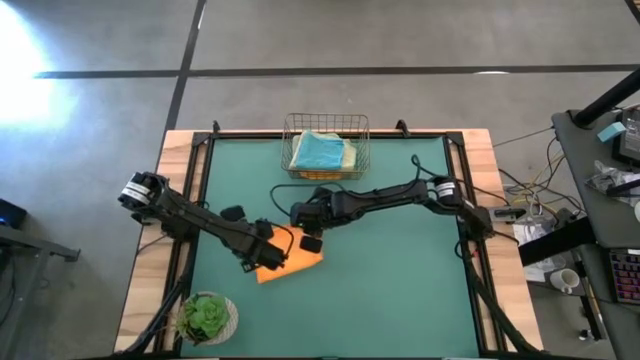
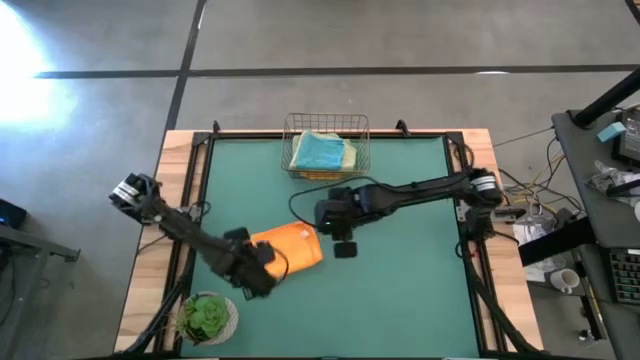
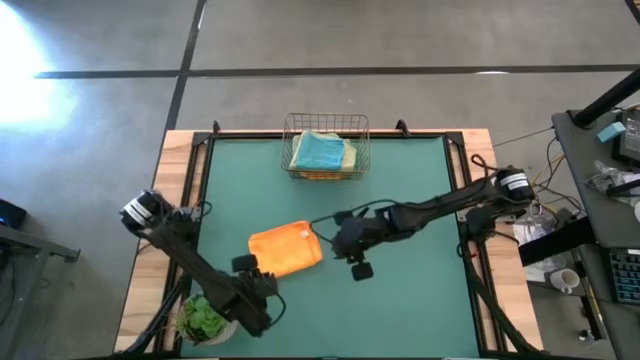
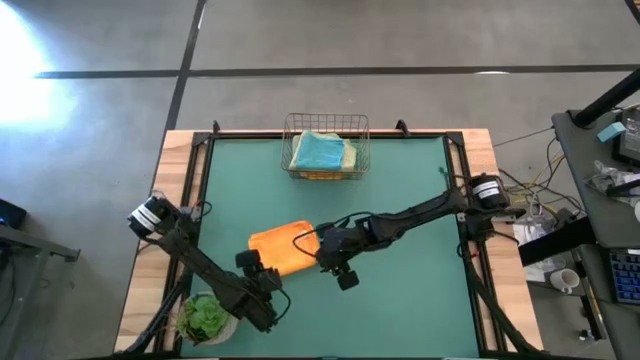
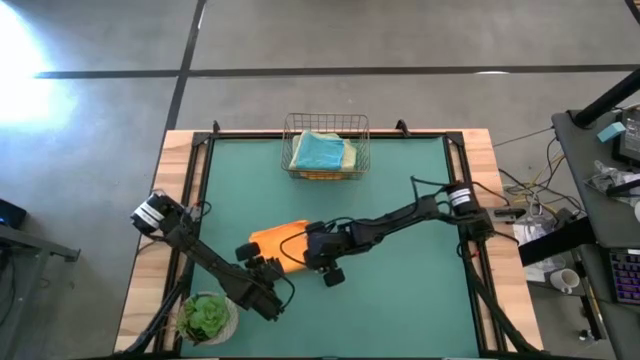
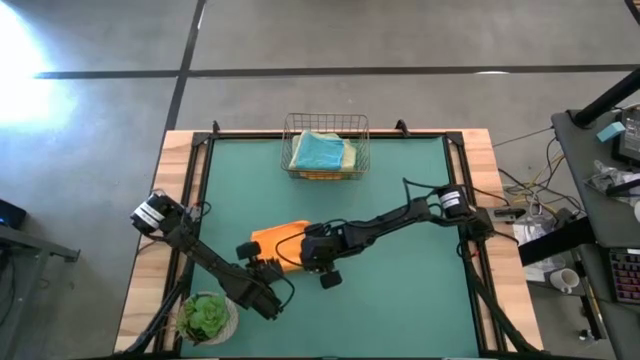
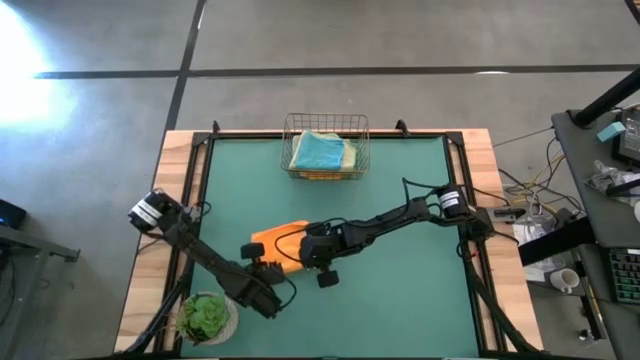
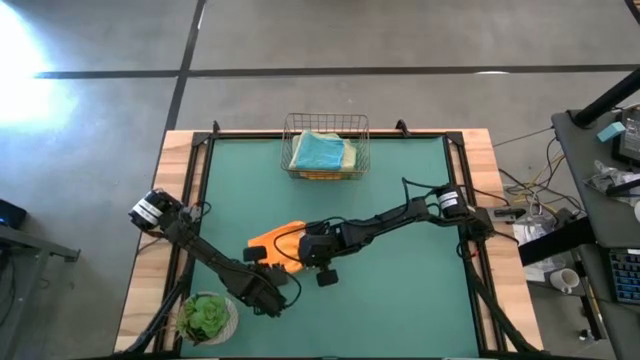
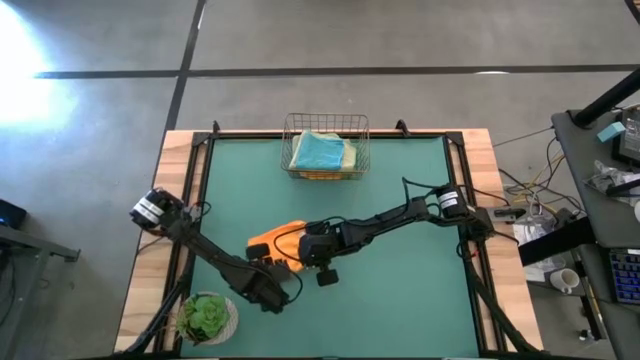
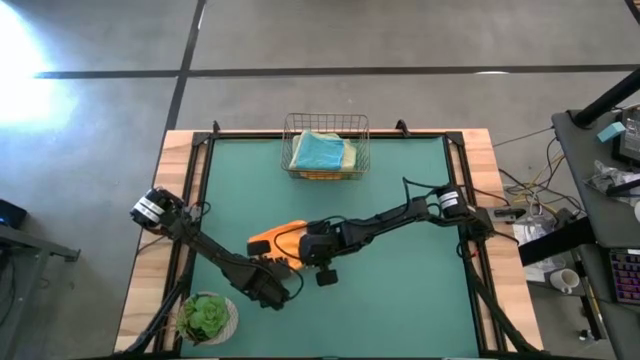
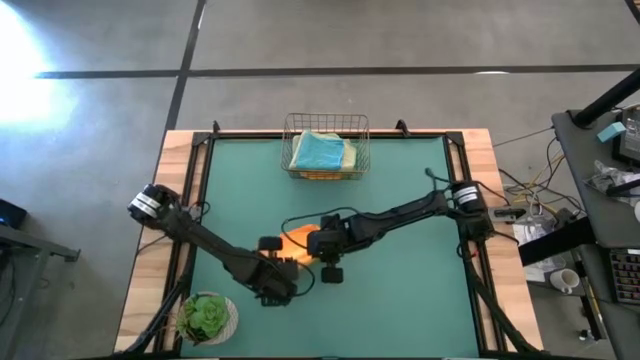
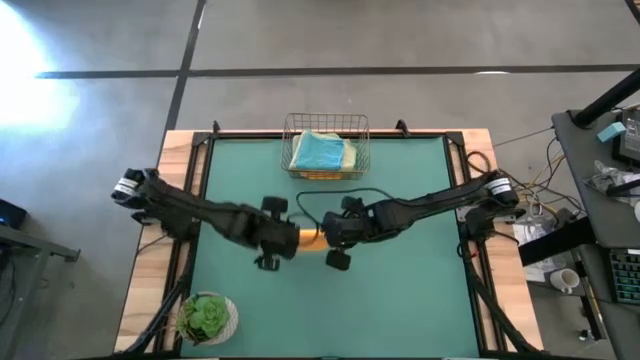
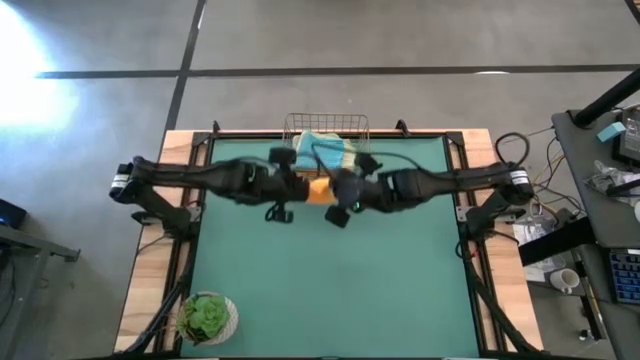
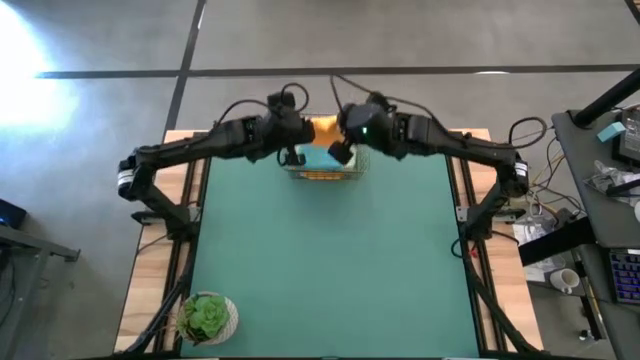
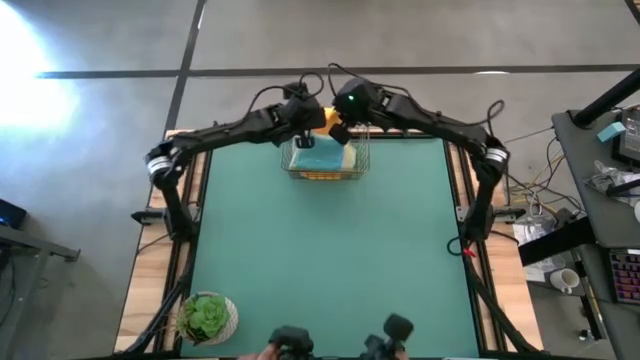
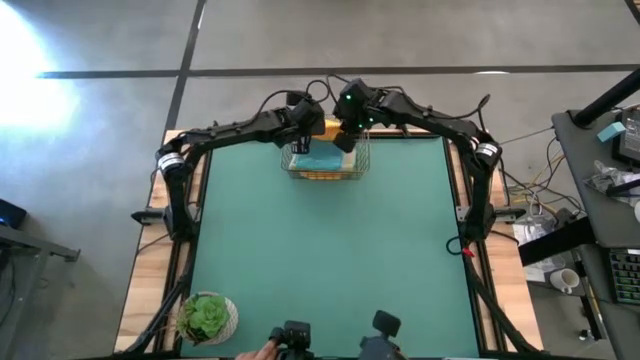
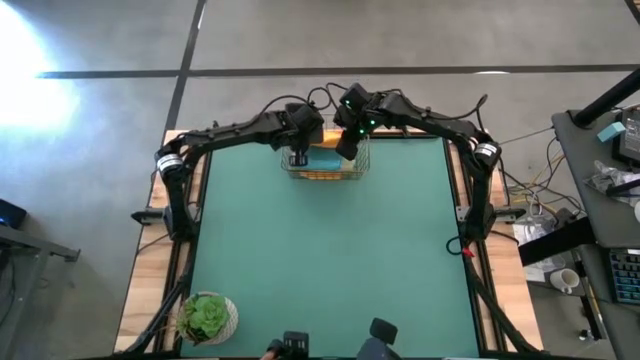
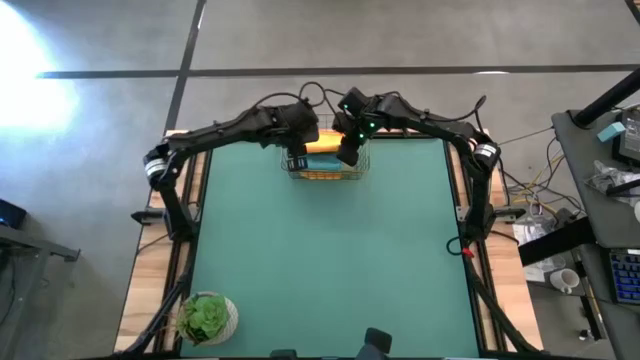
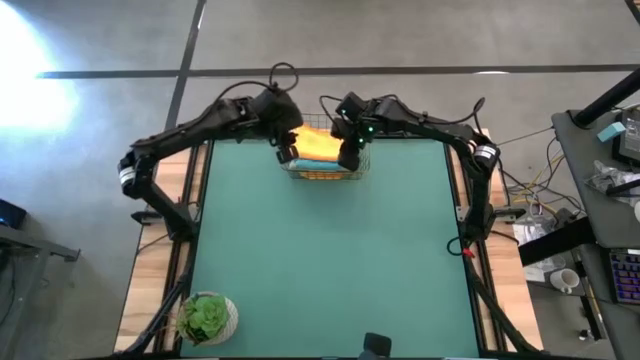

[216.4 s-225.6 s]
Task: Fold microfiber towels
Put the orange microfiber towel into the wire basket

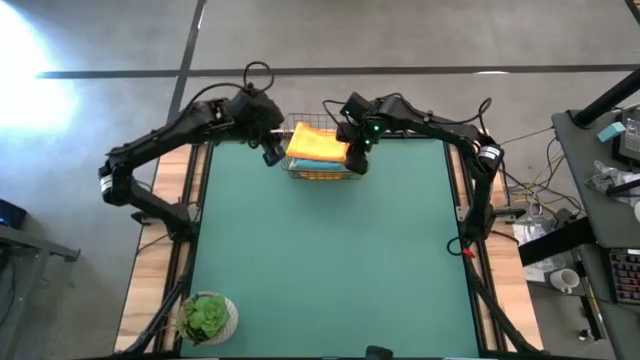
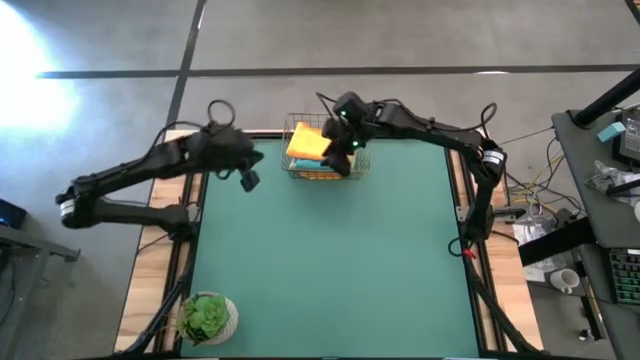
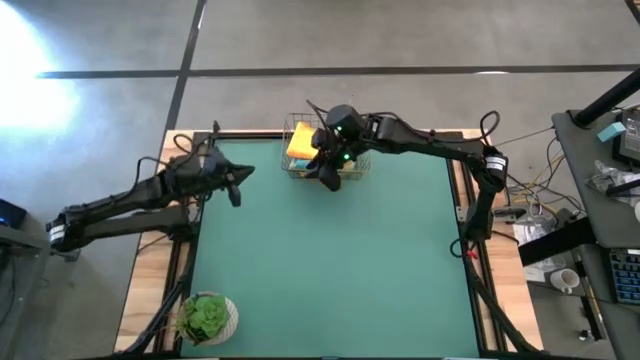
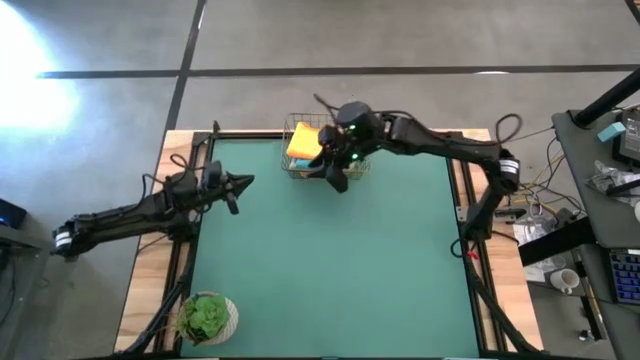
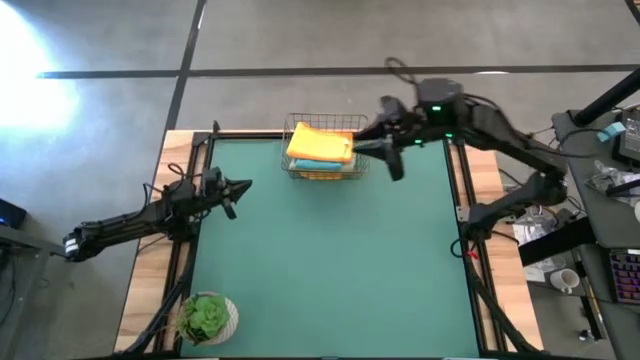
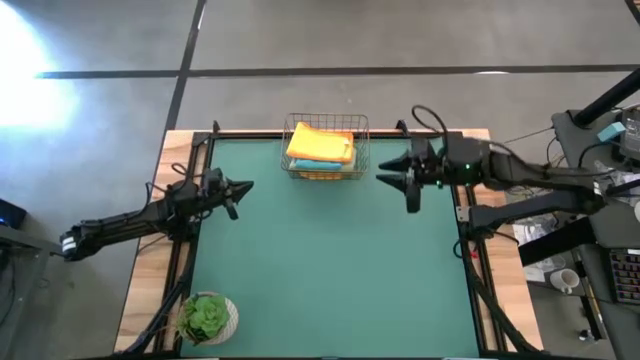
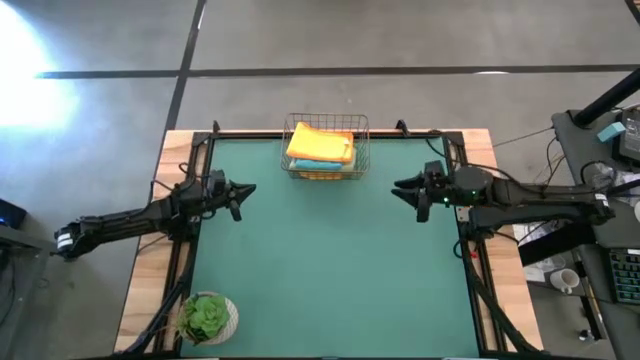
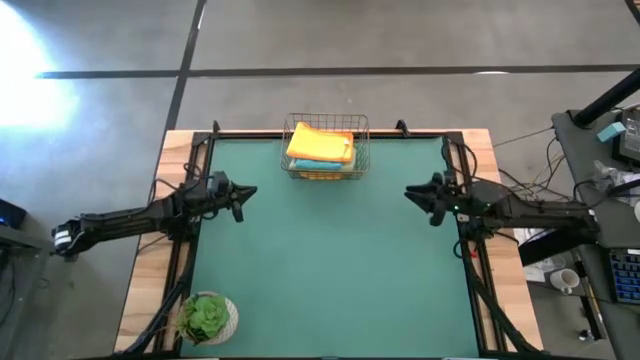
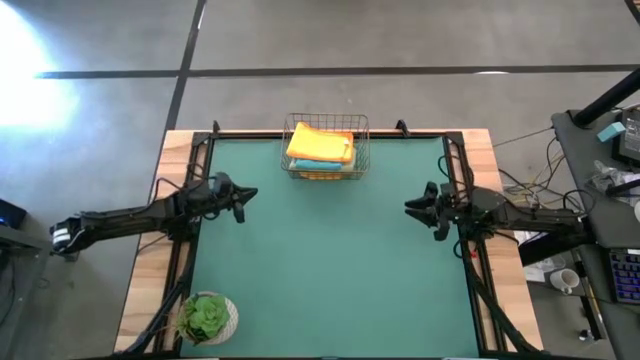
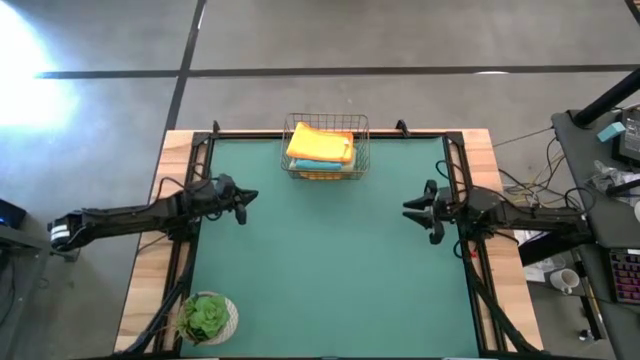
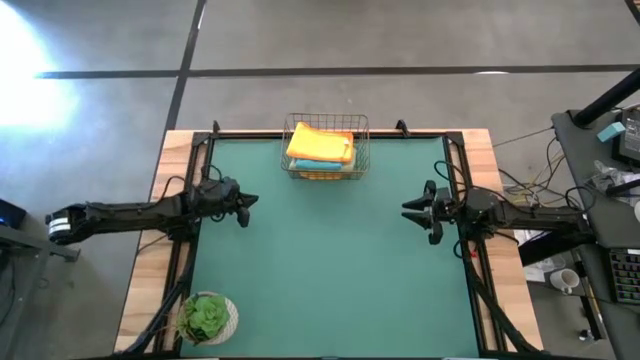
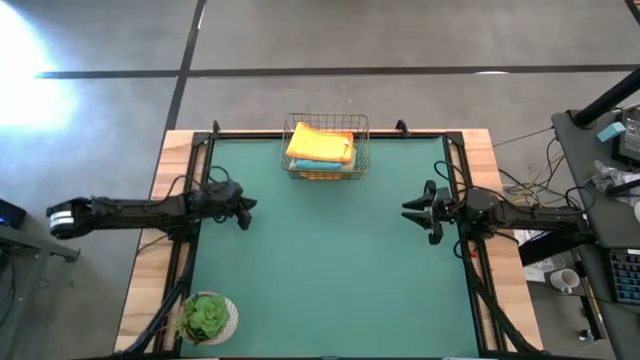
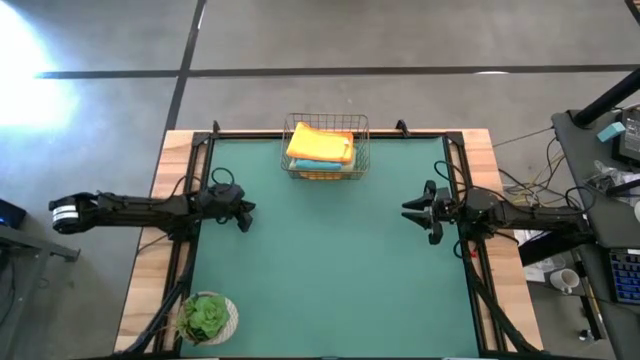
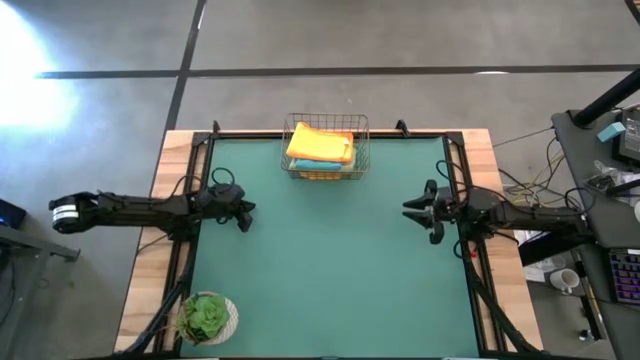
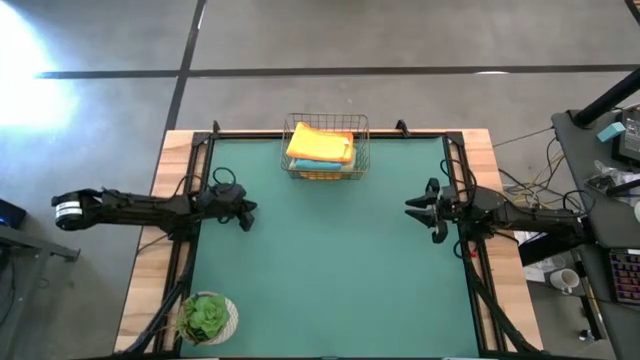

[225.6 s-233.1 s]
Return to Home Position

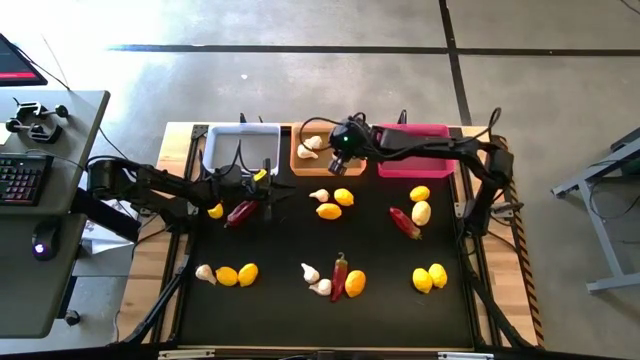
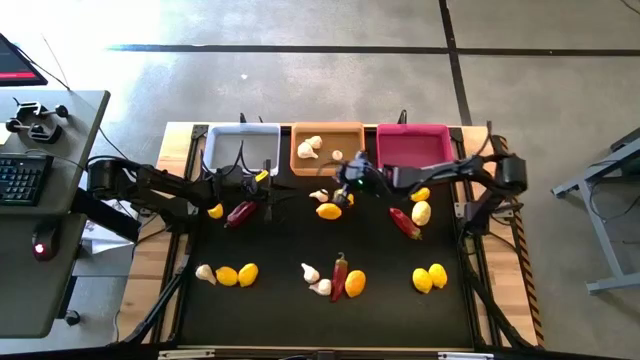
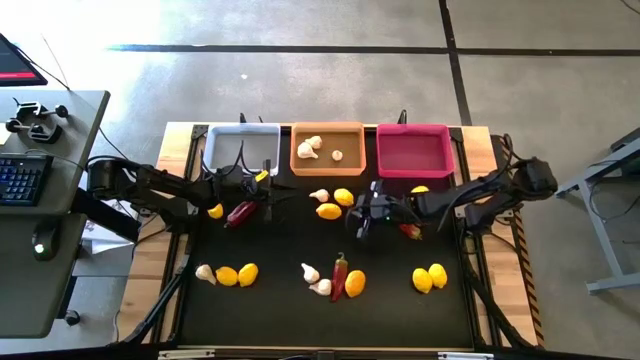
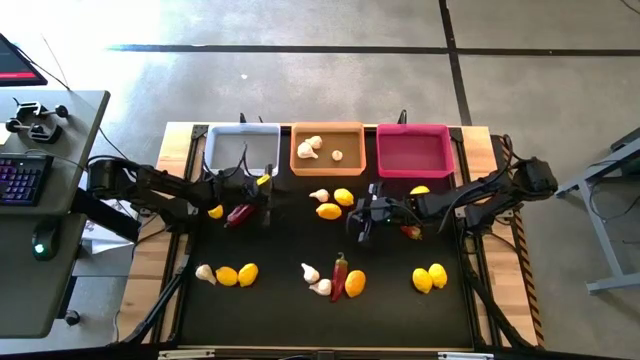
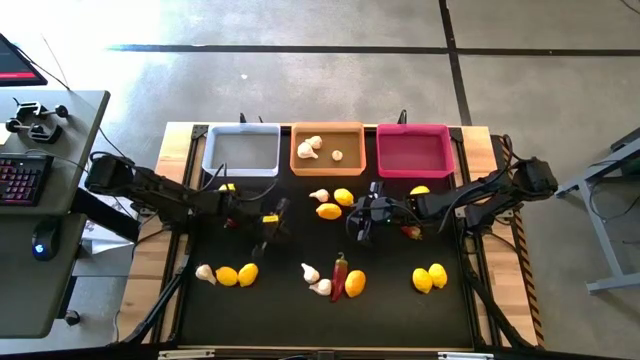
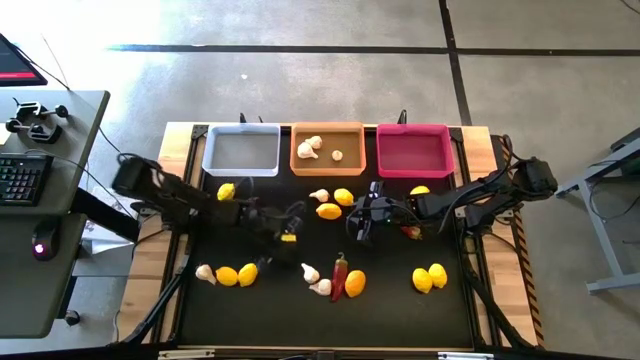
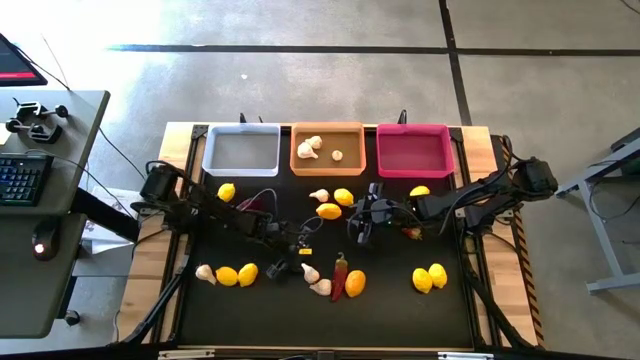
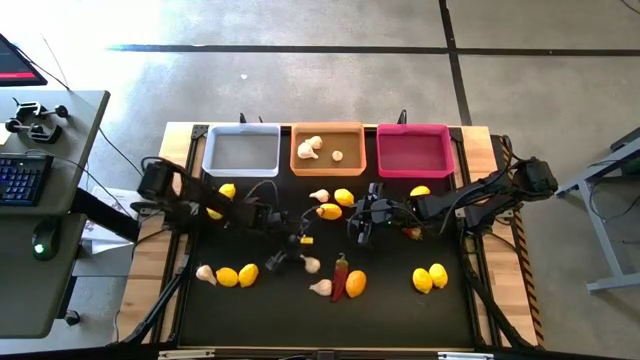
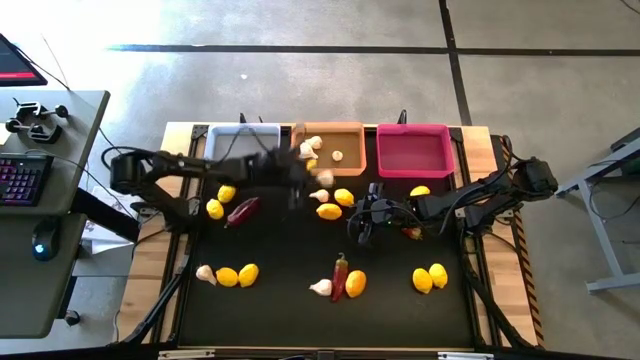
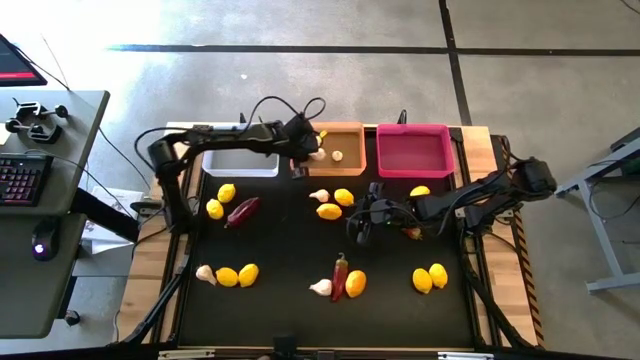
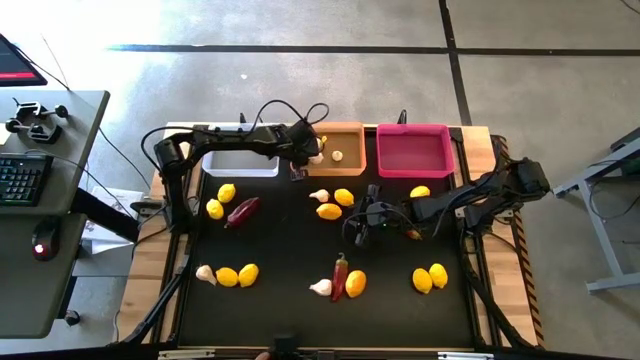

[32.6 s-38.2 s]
Task: Sort produce into baskets
Put the white garlic into the orange bin
